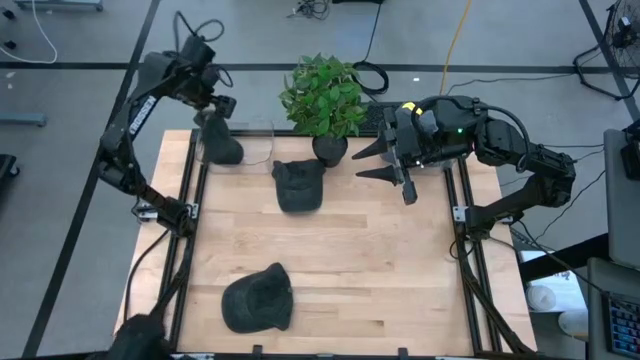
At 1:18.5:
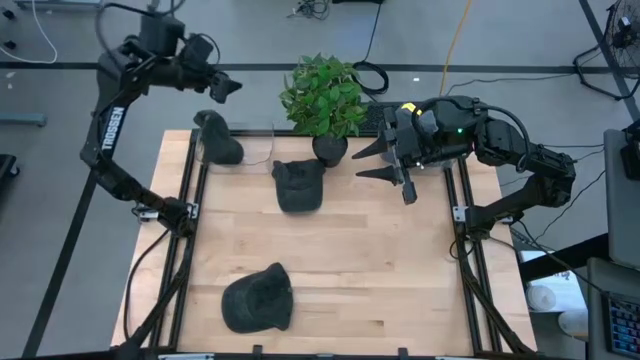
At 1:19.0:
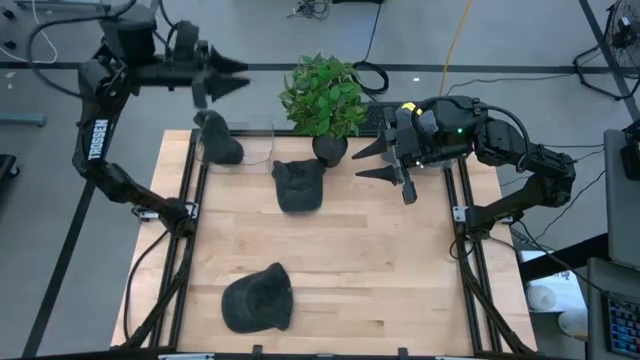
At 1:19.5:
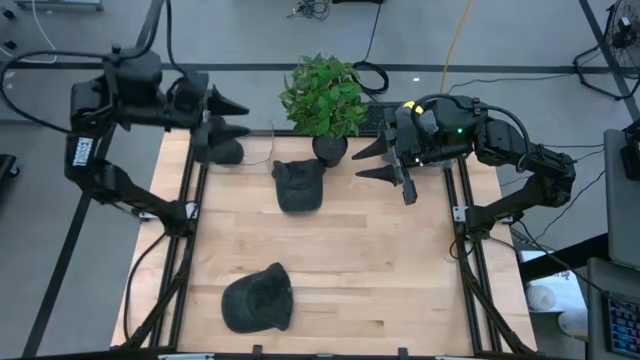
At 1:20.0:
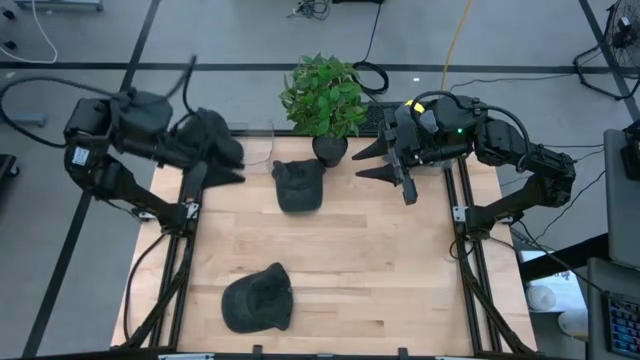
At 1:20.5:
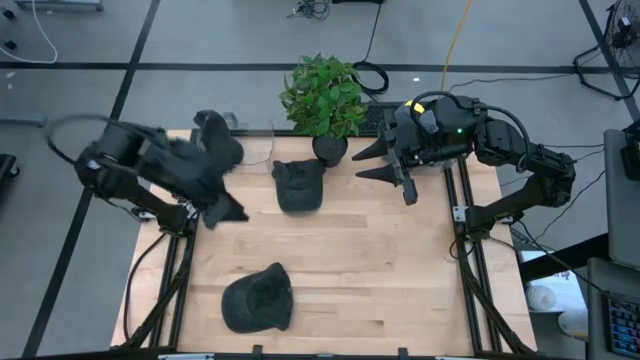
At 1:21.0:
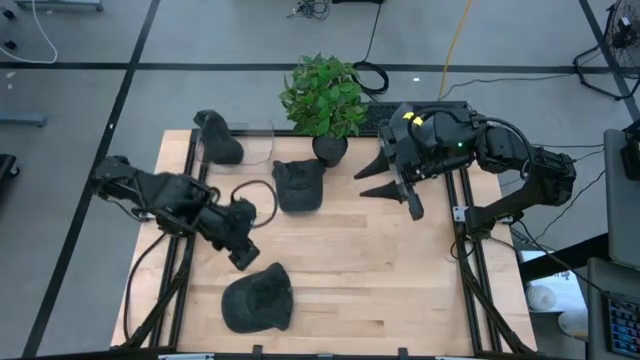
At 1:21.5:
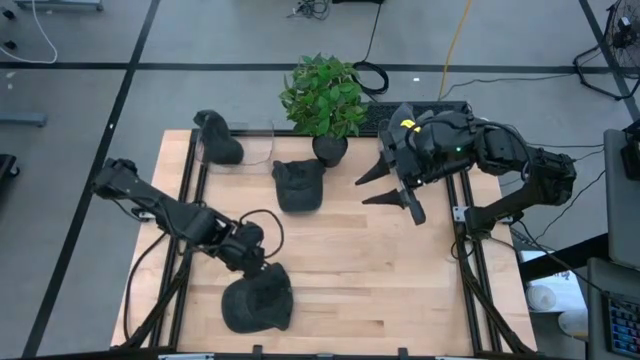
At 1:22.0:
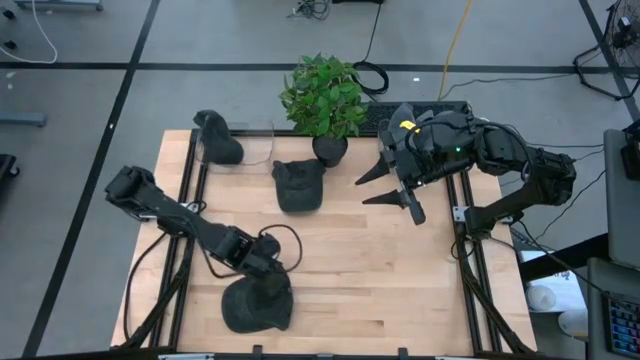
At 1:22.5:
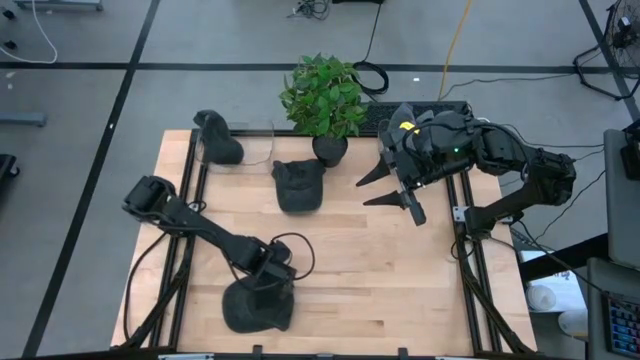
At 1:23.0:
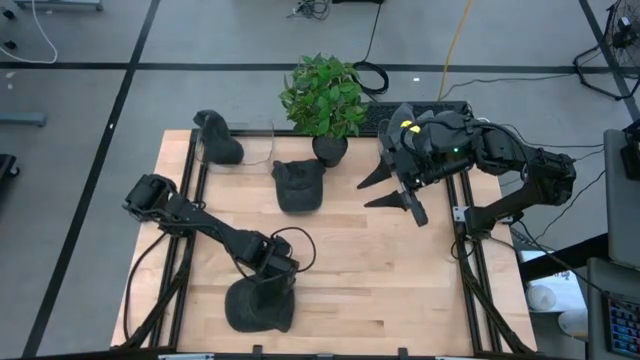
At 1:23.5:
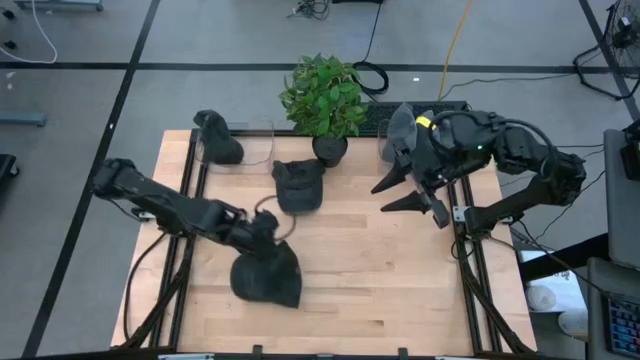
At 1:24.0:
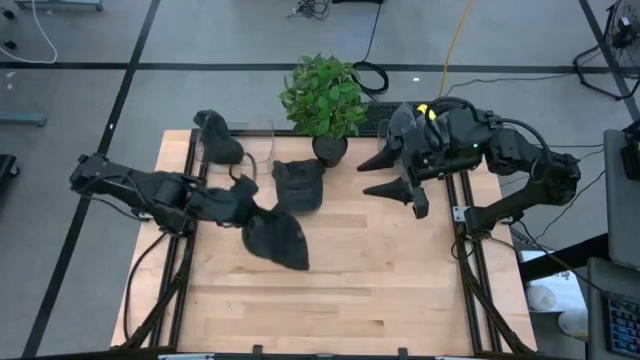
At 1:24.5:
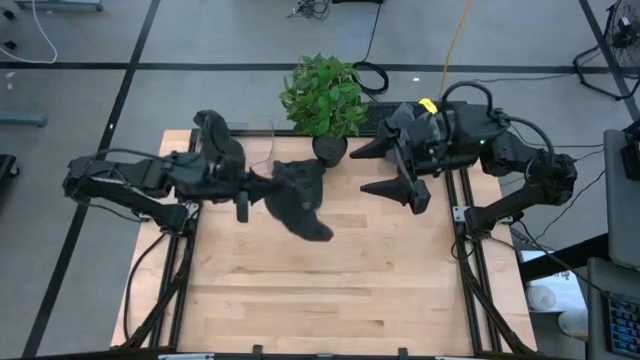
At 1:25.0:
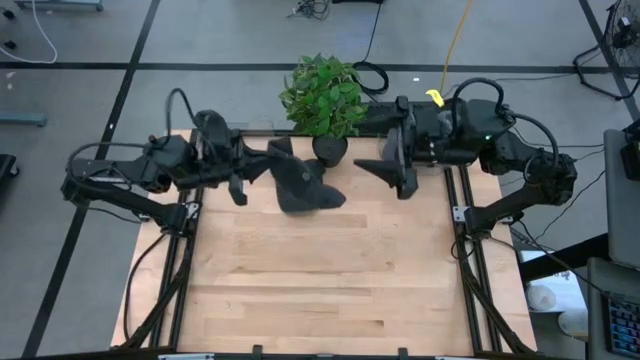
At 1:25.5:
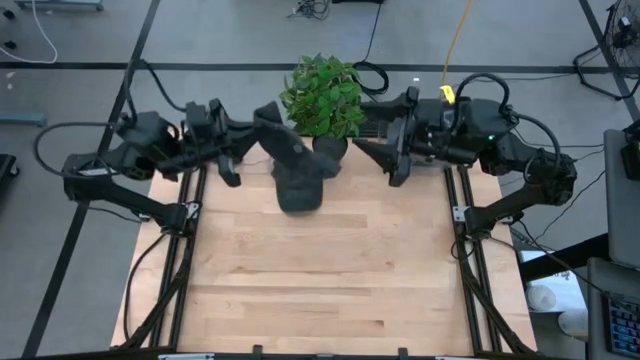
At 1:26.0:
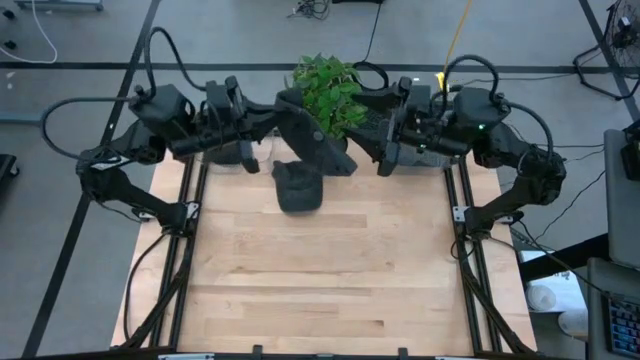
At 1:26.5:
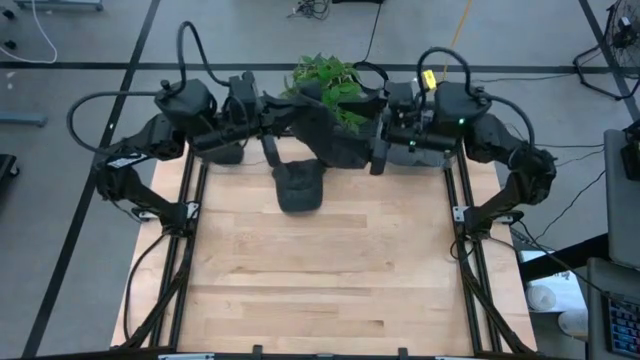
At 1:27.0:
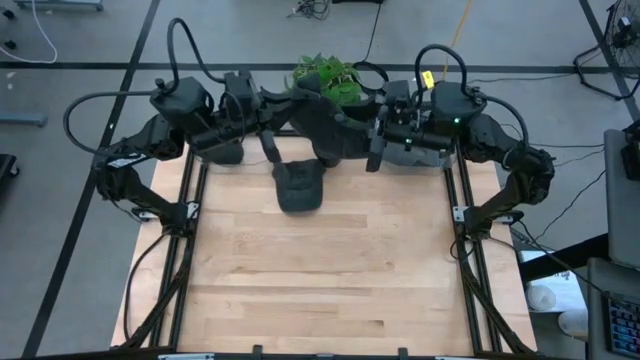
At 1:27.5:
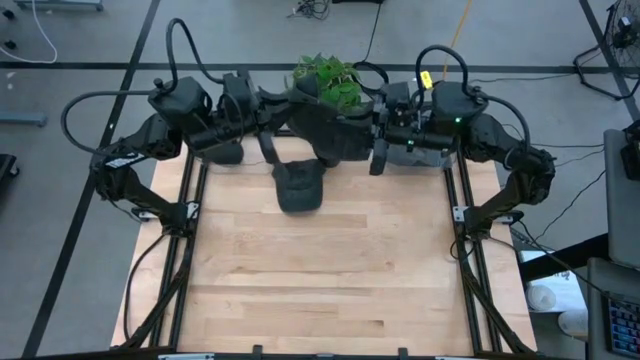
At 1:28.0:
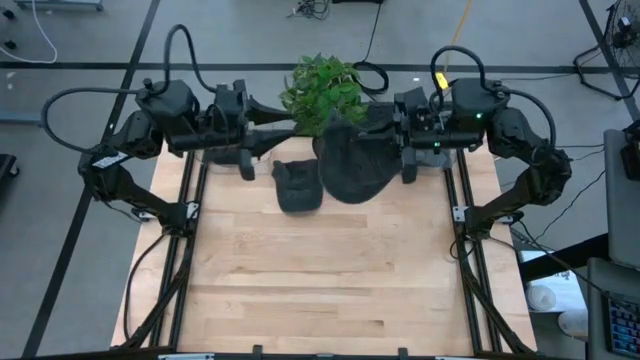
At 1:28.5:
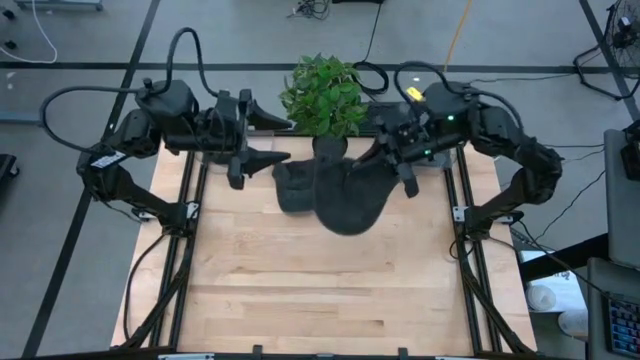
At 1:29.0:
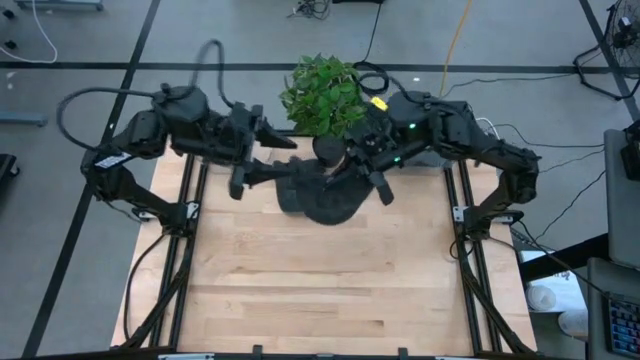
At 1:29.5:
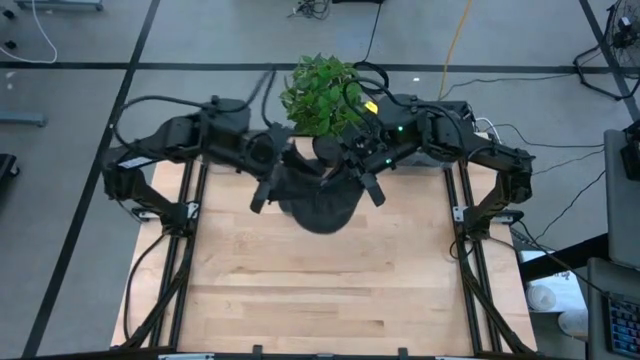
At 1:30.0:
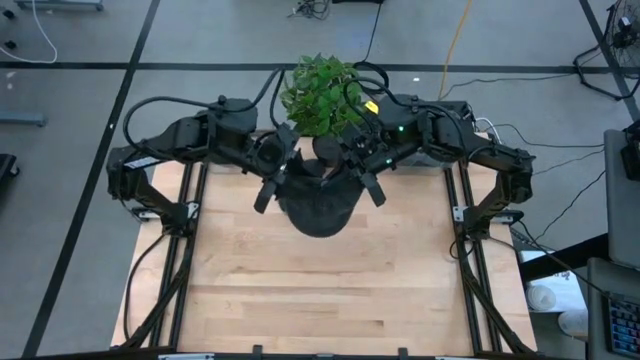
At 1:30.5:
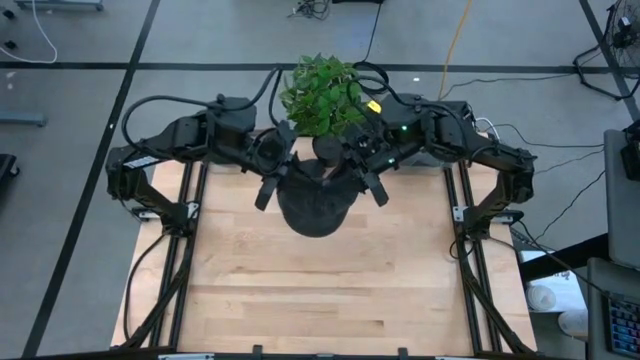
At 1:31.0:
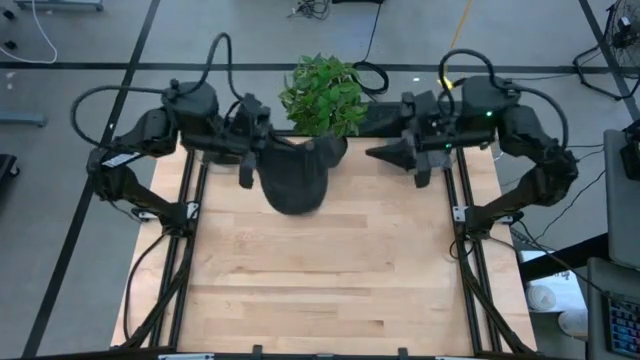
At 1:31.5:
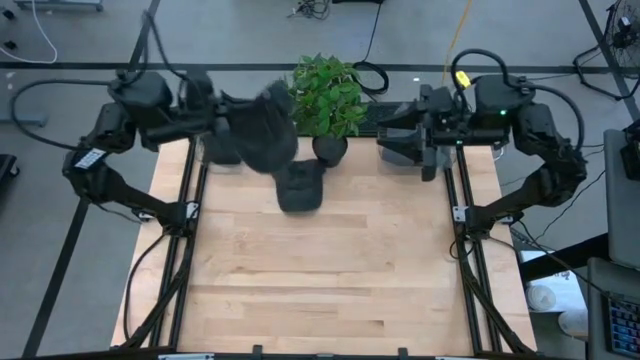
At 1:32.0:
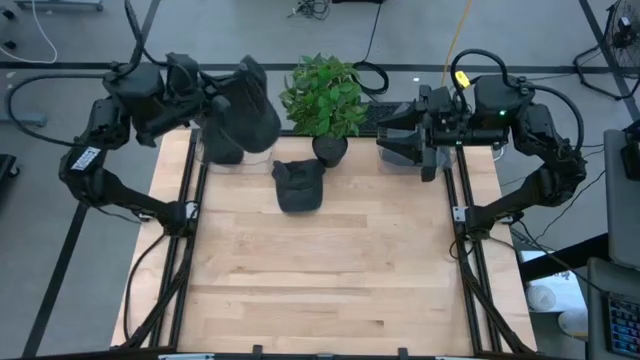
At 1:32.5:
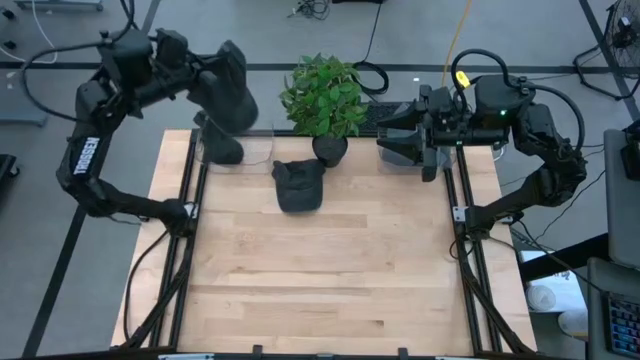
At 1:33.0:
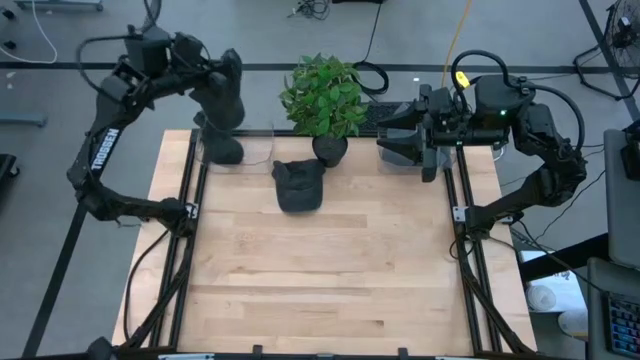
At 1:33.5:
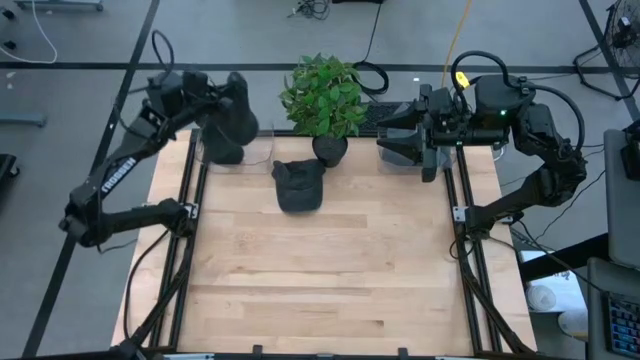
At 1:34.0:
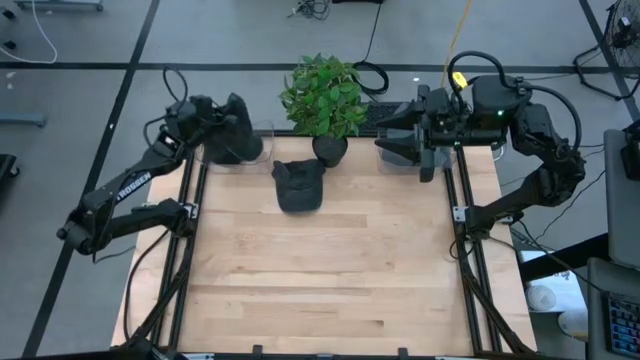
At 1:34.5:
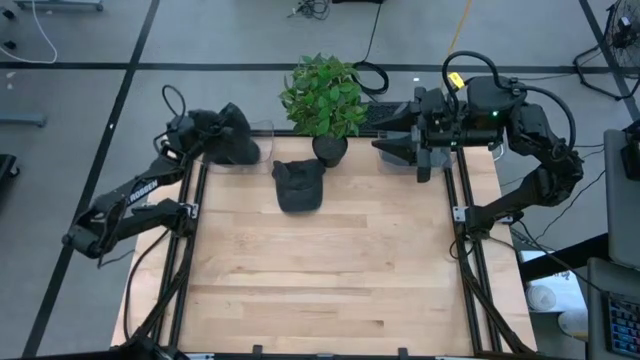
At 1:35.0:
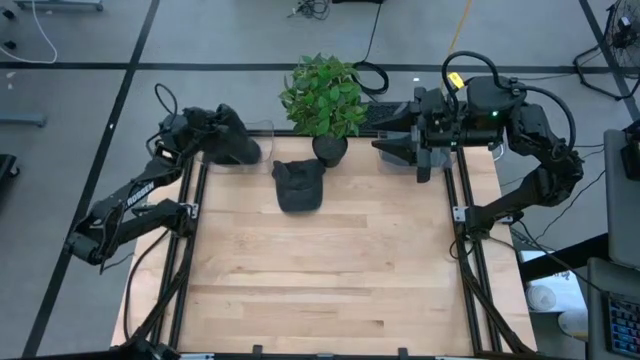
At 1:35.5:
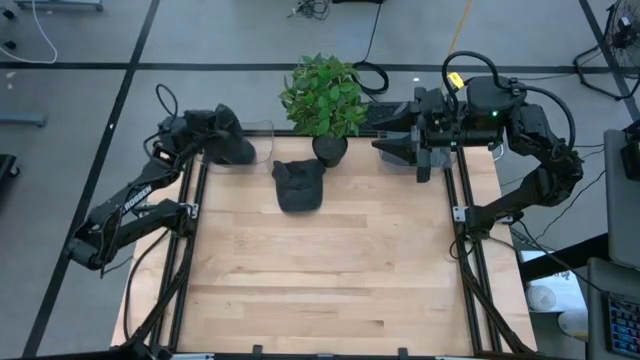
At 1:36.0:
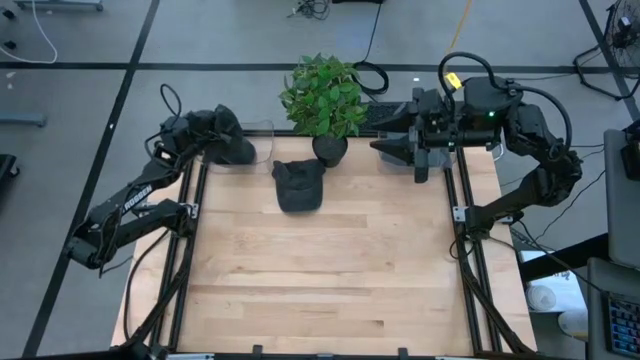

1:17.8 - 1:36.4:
Task: Pick & Place hat
Put the bottom black cap into the left transparent bin
